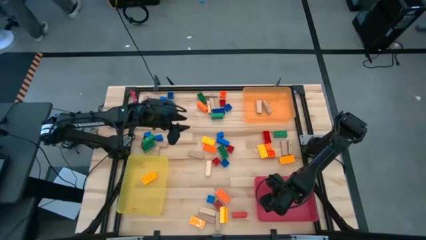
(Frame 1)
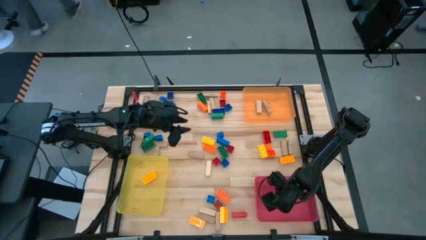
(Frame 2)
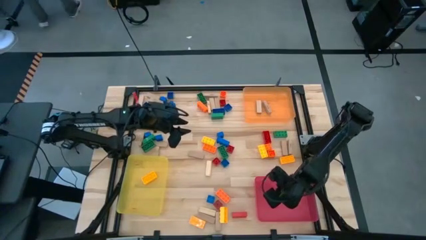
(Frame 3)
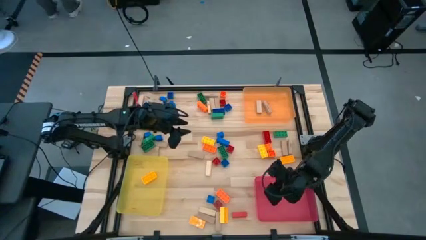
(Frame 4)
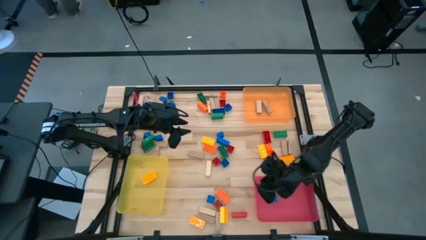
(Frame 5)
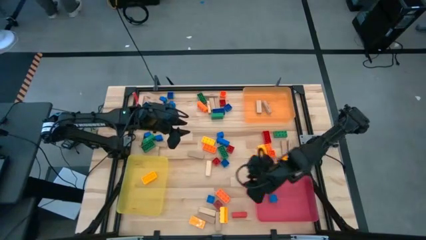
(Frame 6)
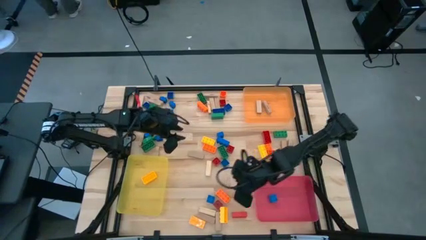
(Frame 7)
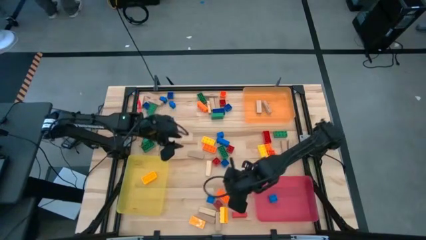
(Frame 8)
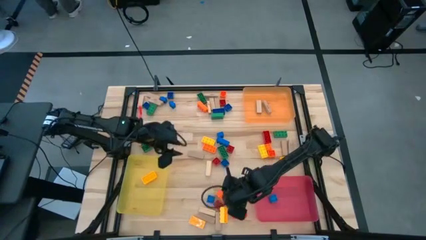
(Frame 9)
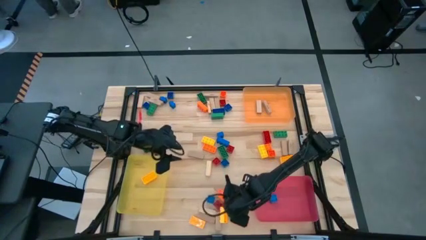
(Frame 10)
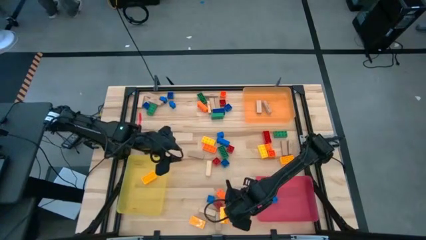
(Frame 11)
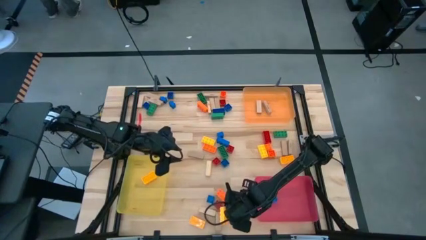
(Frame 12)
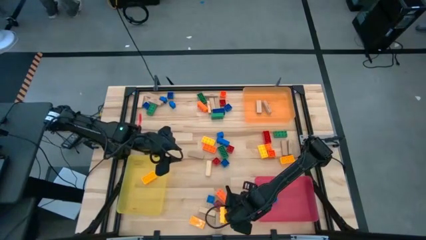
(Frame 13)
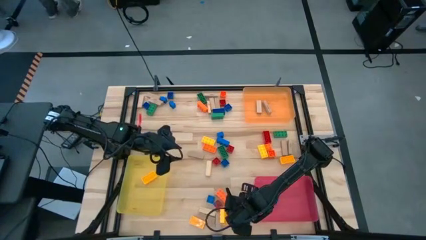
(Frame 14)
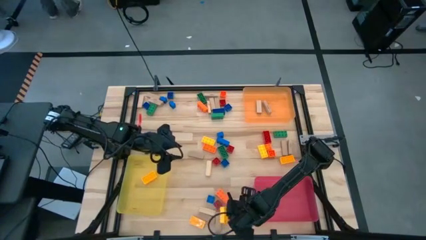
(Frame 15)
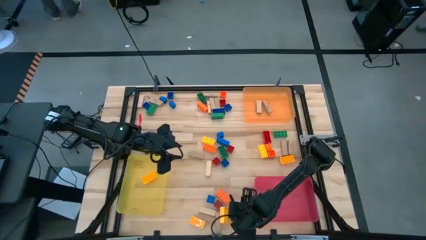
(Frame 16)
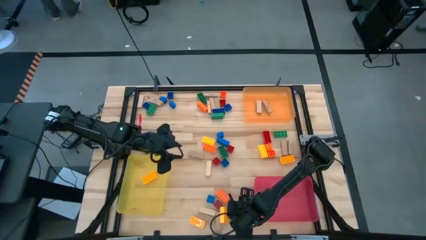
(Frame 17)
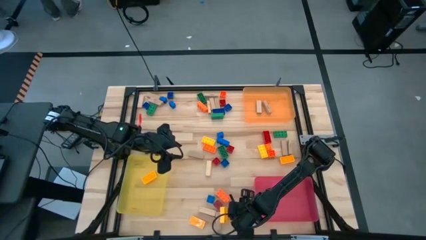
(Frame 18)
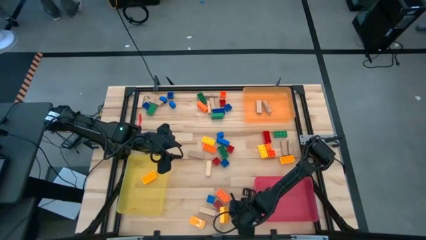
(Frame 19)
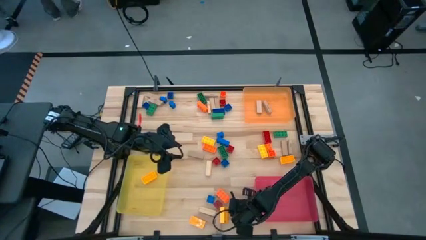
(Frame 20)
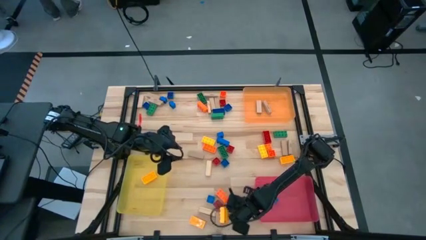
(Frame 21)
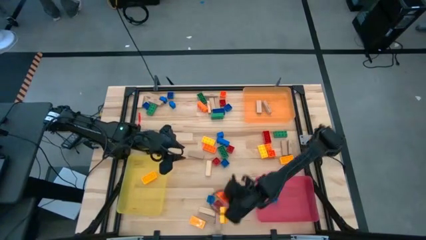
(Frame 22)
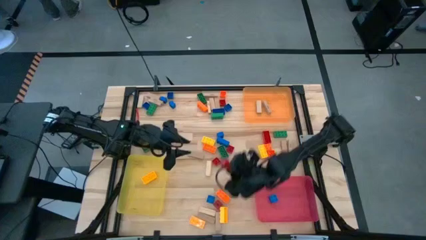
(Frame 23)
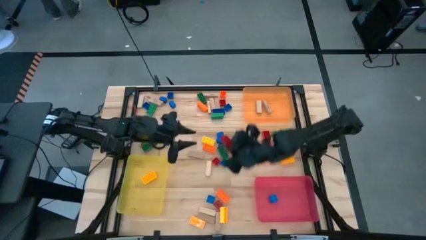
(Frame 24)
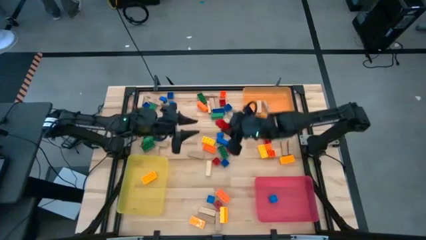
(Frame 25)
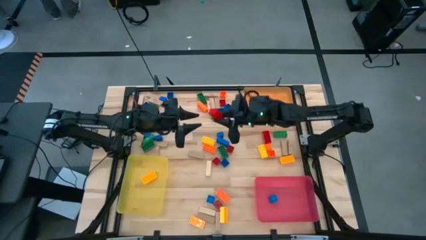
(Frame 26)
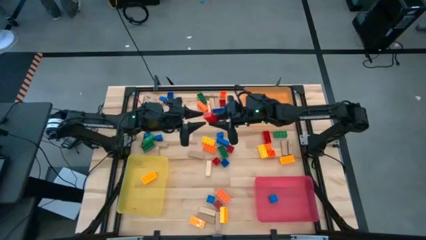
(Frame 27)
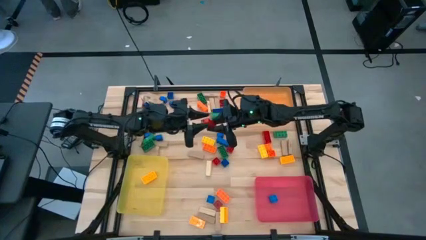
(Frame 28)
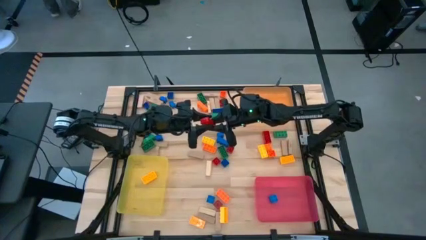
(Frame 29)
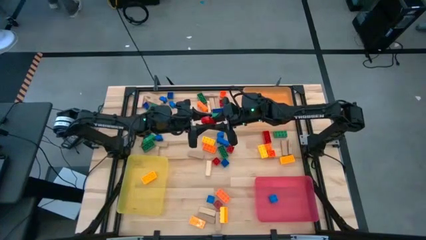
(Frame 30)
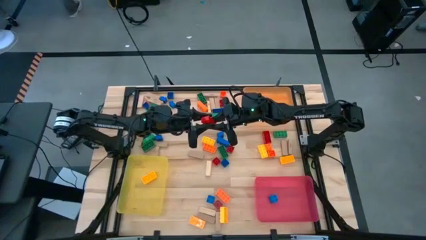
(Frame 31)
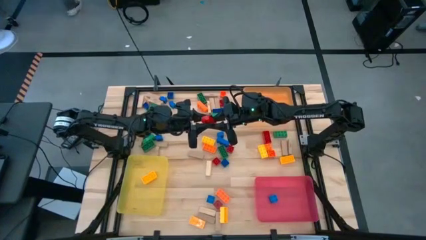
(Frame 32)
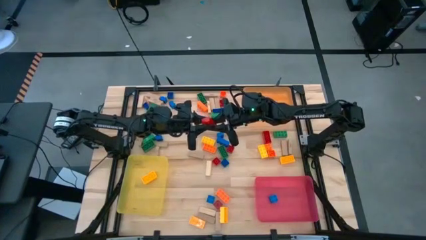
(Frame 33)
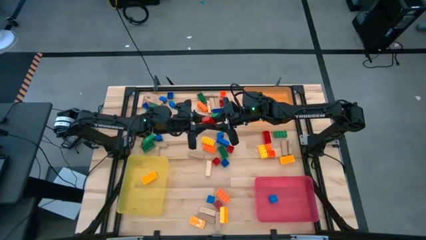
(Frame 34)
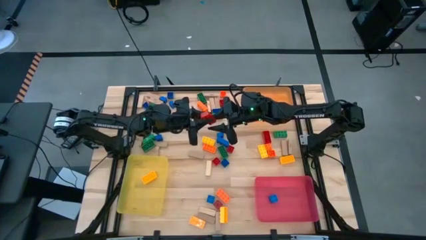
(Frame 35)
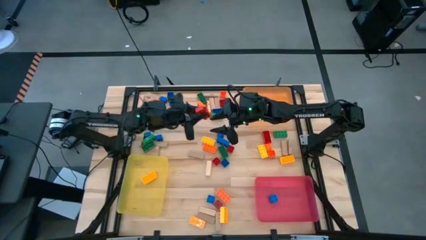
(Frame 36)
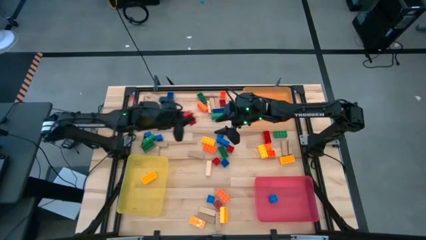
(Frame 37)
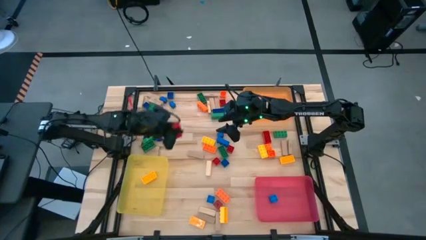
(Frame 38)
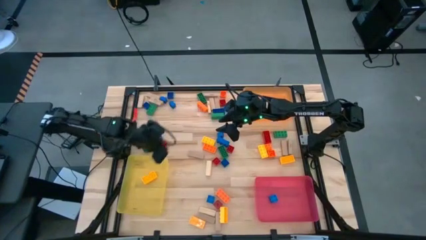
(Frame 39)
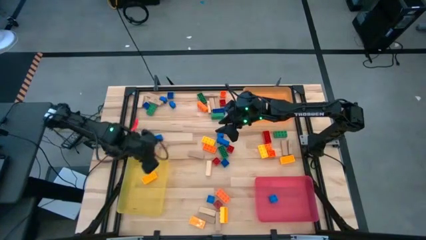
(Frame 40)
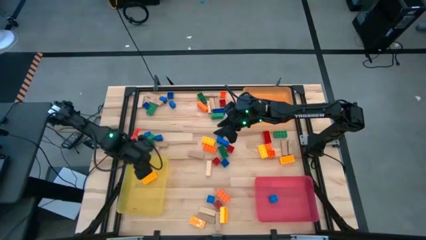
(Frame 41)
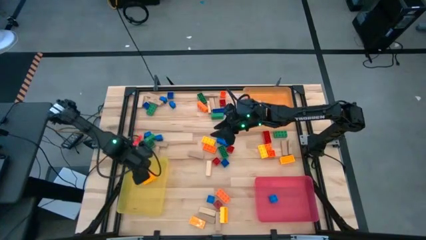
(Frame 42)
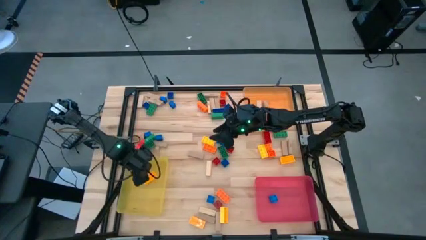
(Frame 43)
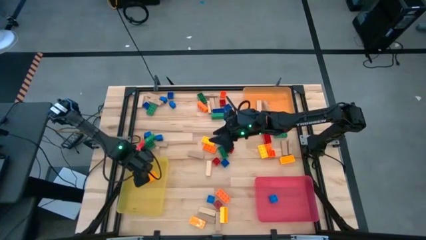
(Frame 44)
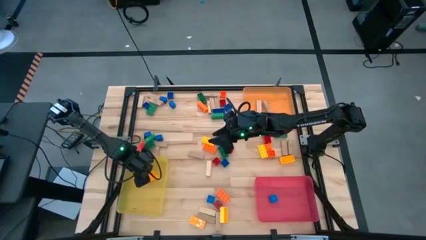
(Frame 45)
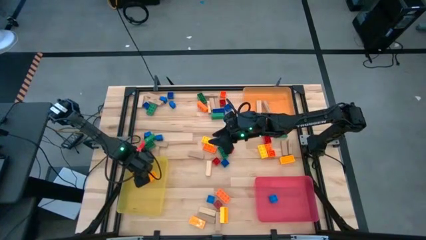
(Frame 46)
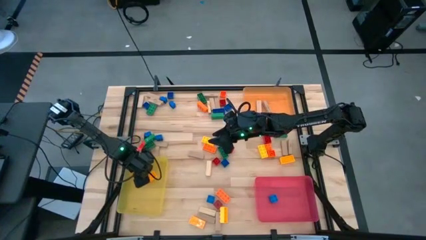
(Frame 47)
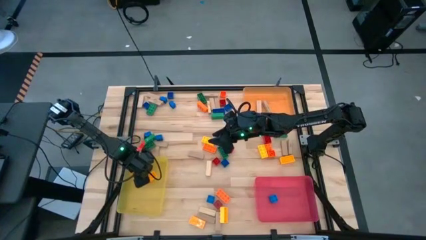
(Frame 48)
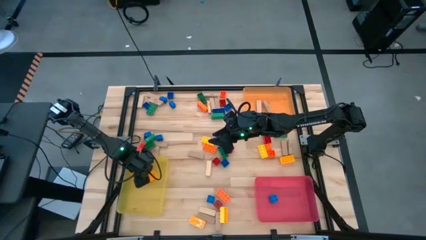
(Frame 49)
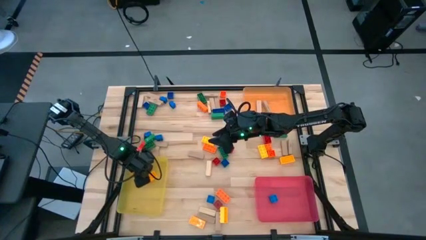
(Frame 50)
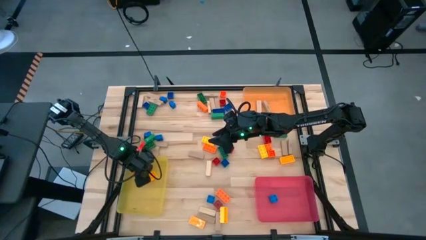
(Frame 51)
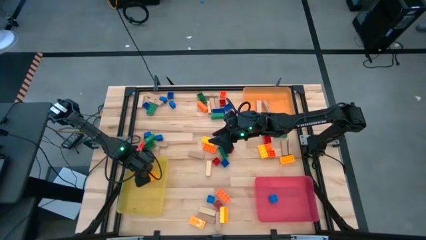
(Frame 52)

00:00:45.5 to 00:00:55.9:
Task: Sort blocks by size
Put the large red game piece into the yellow bin

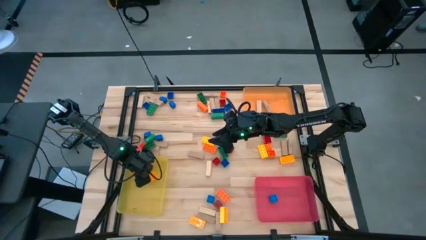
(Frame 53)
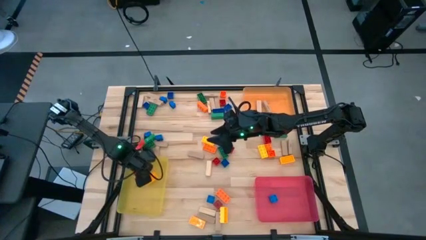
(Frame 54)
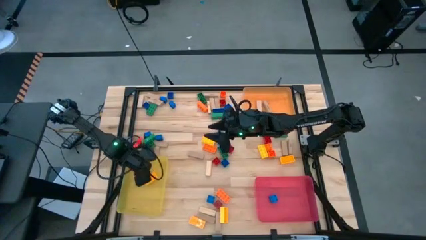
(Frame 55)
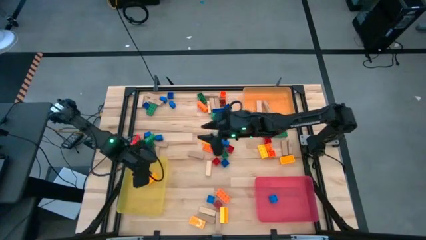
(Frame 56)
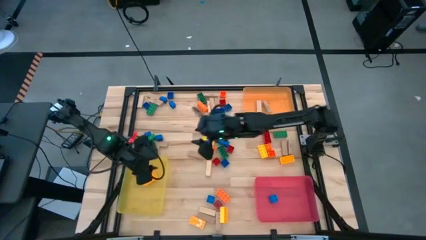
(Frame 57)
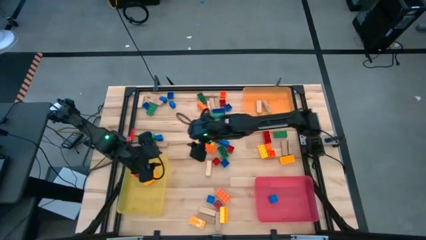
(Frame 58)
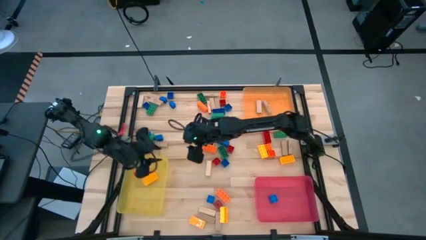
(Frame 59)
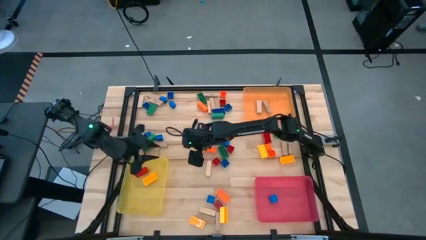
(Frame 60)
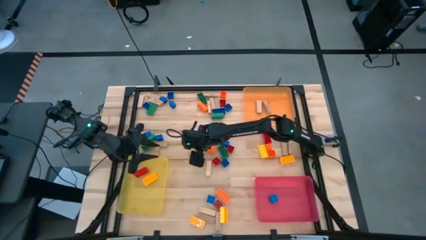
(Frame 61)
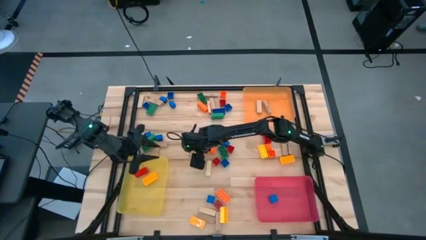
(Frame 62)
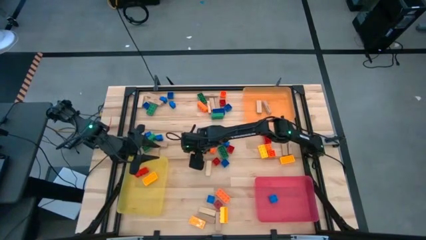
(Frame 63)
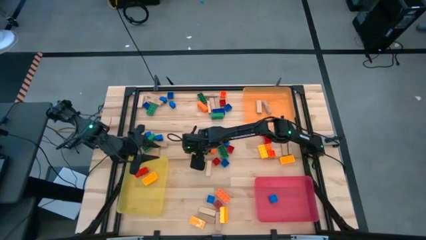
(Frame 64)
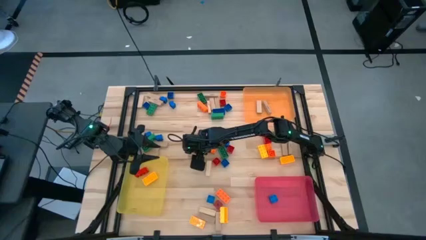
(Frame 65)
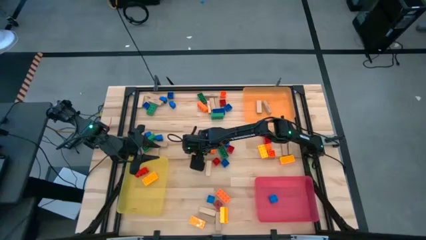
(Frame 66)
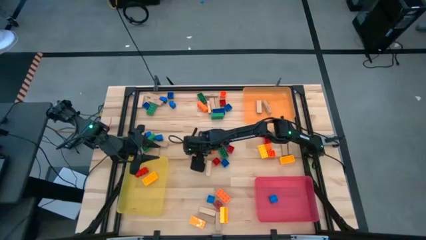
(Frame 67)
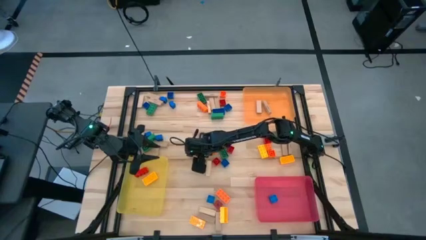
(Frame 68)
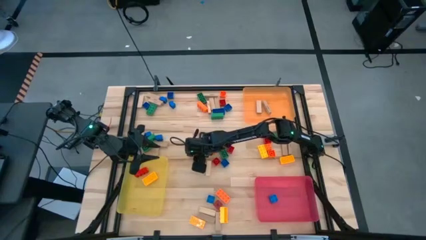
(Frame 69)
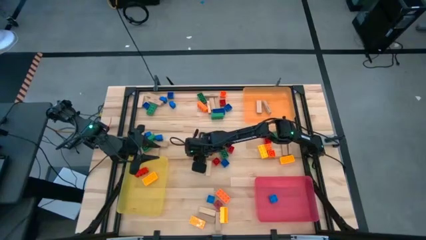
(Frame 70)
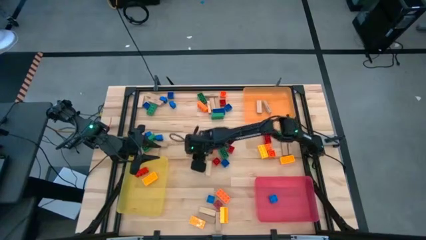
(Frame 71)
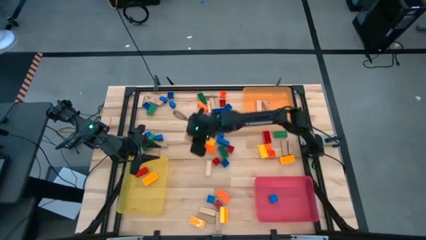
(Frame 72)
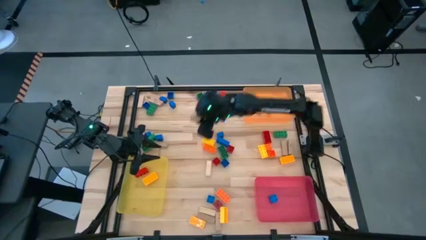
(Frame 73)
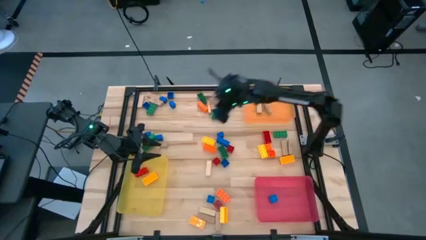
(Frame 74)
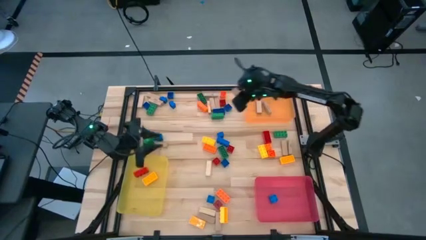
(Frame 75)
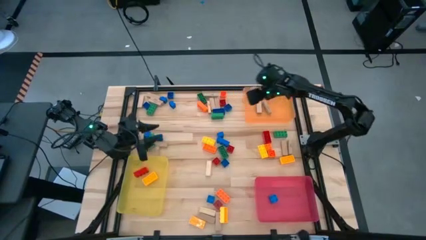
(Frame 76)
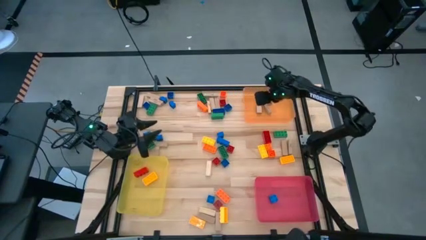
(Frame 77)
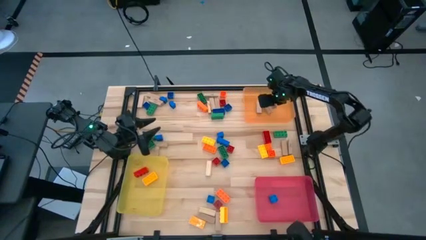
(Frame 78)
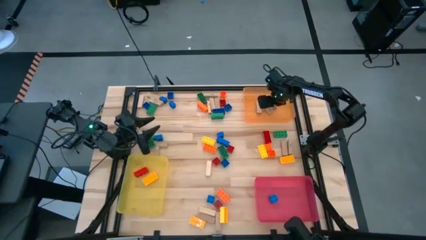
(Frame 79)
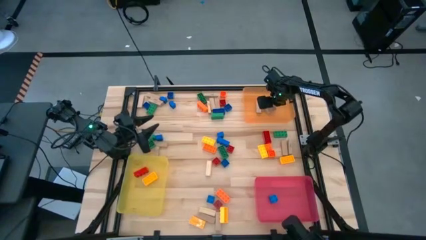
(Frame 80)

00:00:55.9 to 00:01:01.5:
Put the brown block into the orange bin
